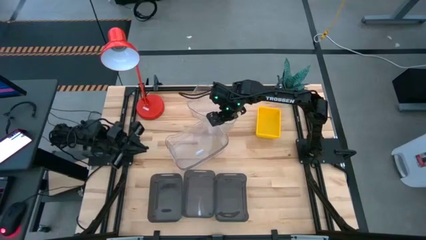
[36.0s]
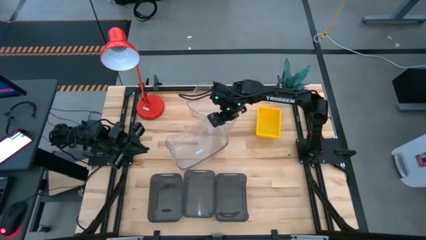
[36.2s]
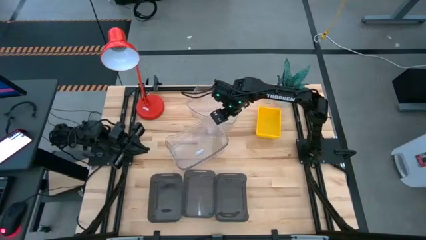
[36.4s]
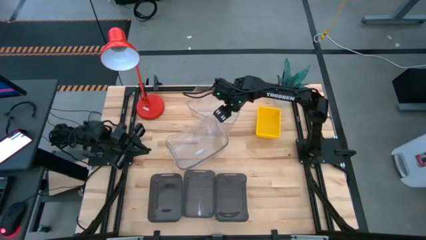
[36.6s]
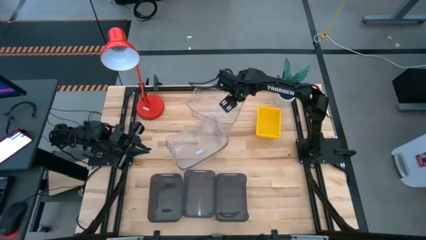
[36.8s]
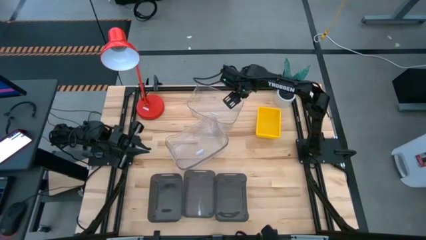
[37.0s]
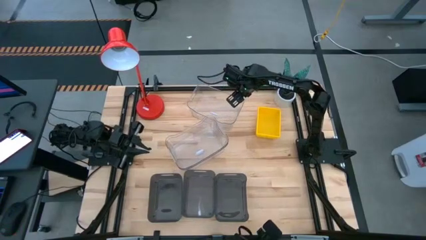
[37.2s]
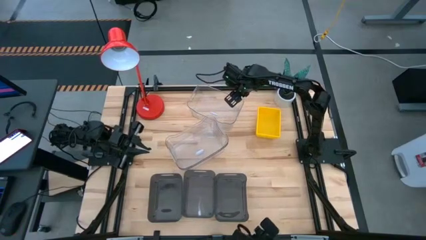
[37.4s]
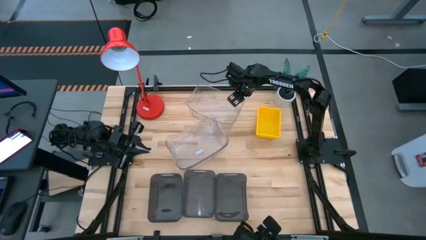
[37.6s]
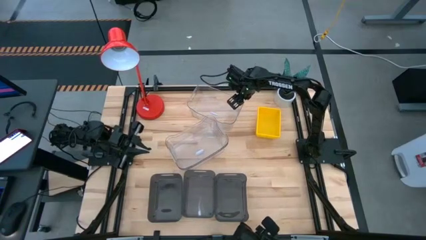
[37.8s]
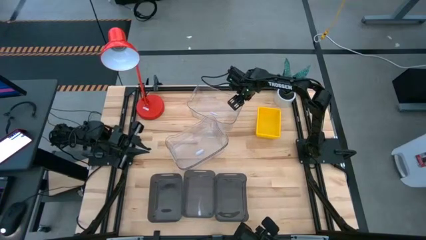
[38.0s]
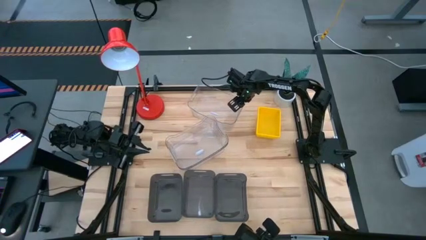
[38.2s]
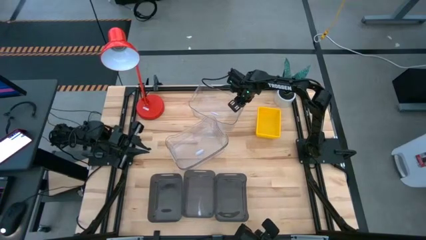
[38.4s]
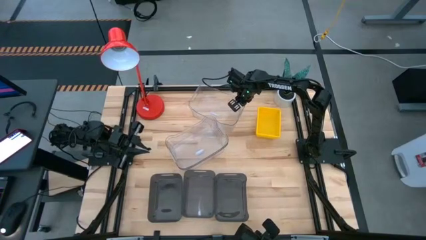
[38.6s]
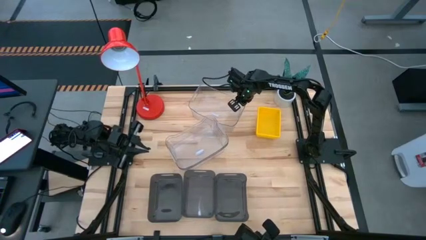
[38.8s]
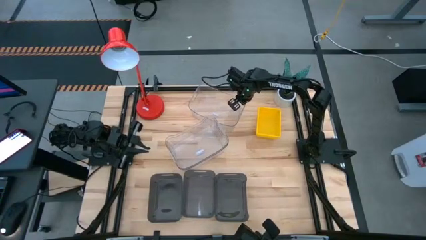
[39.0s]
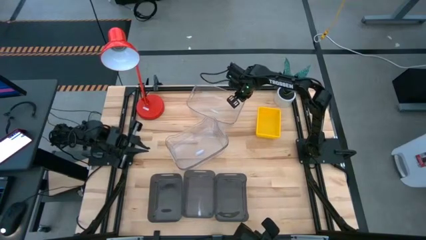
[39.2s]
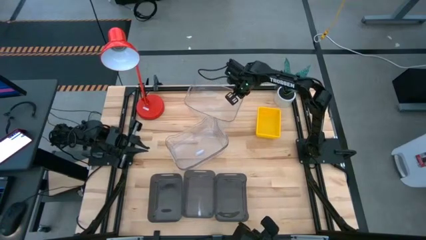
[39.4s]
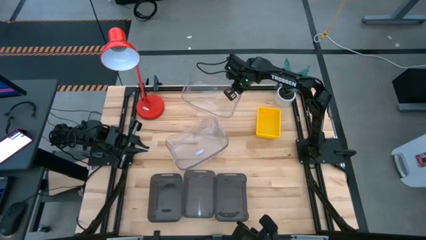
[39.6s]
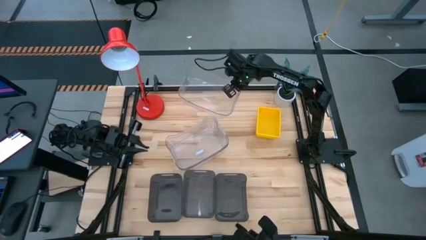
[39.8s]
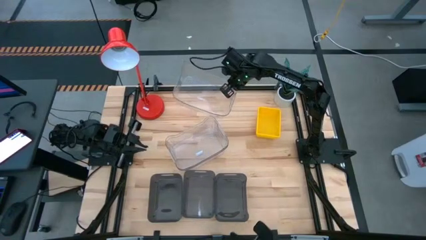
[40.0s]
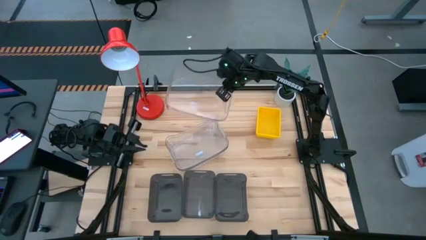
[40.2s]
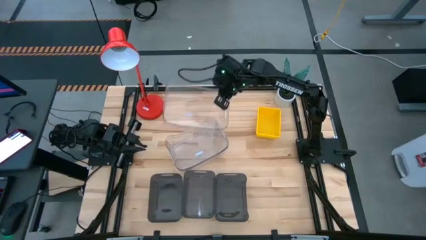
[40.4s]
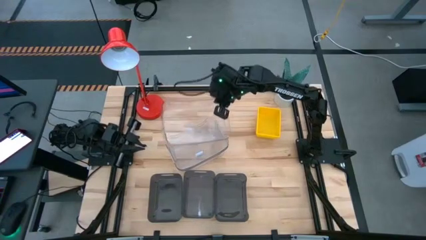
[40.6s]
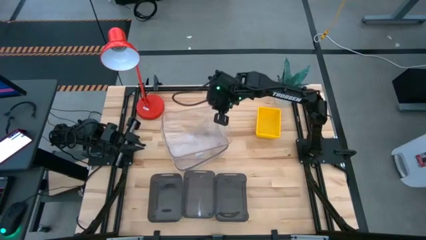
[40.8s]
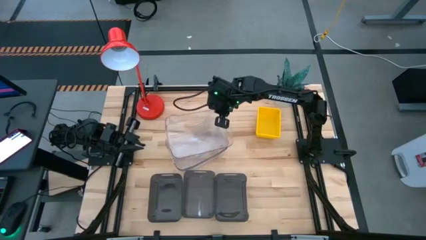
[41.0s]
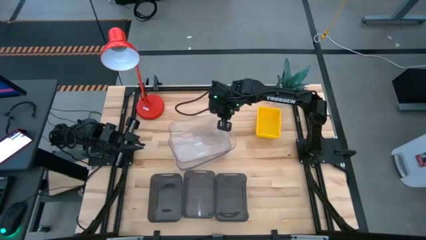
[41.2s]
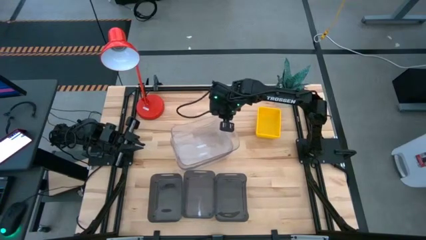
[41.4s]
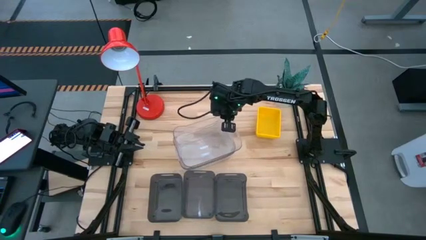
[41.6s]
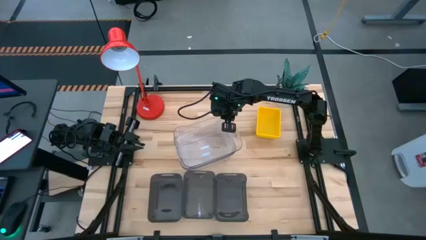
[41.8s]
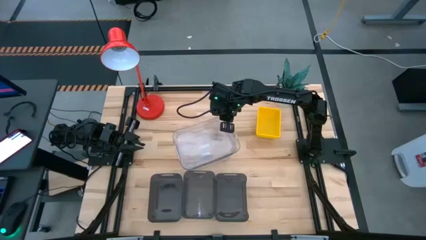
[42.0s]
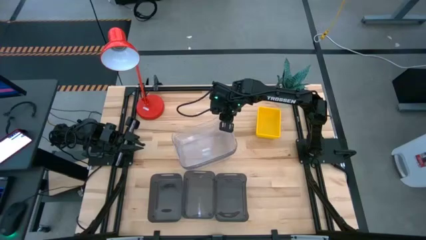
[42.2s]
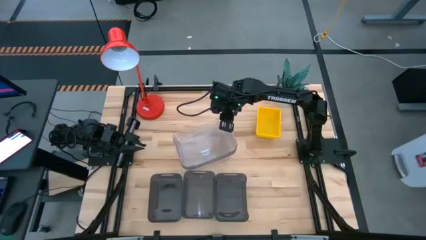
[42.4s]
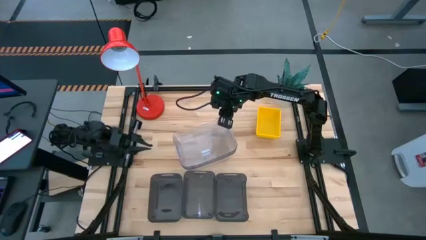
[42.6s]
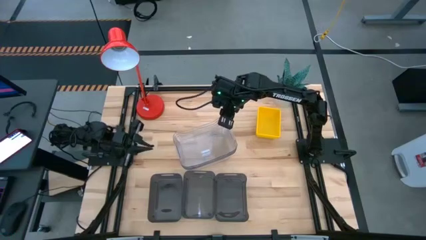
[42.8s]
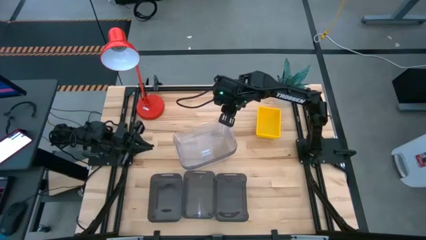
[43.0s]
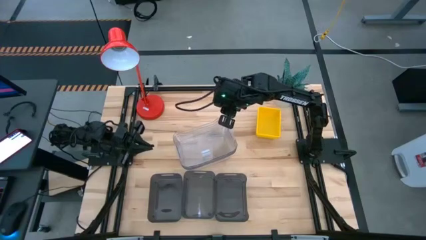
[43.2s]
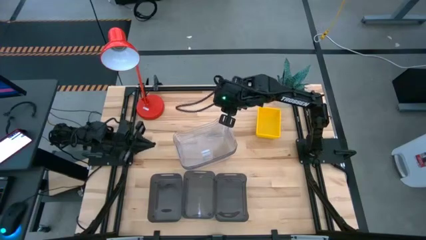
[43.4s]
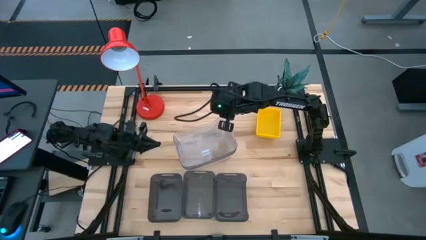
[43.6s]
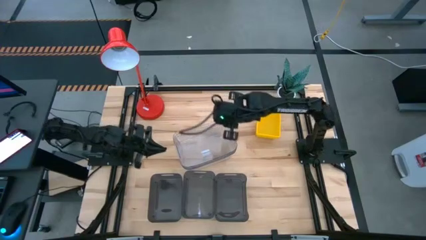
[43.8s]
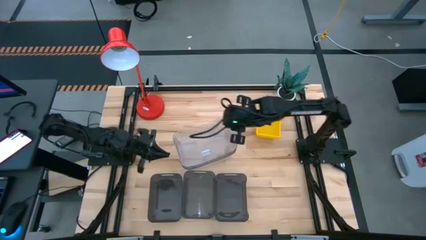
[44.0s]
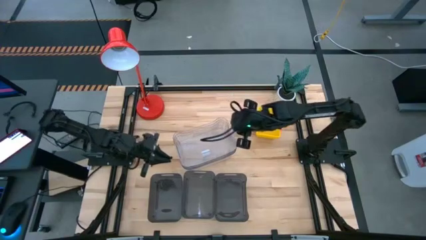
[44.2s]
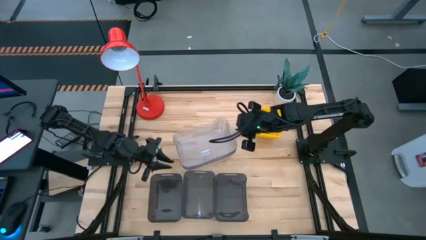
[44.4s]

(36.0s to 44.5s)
Stack the top transparent bin on the bottom stacked transparent bins

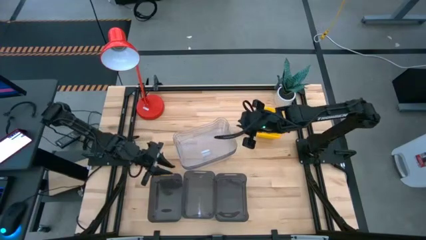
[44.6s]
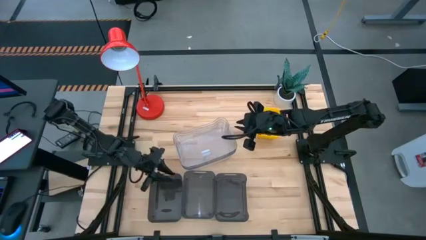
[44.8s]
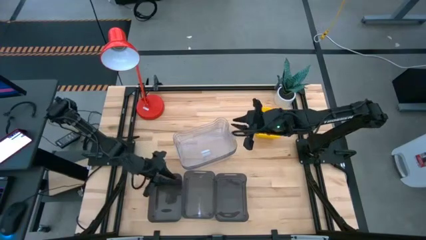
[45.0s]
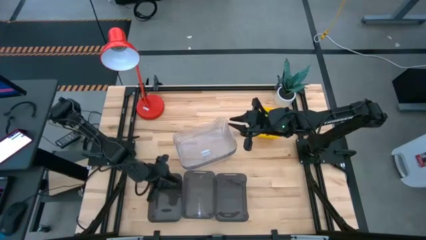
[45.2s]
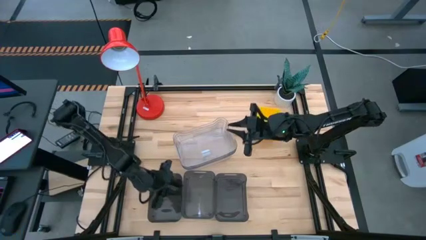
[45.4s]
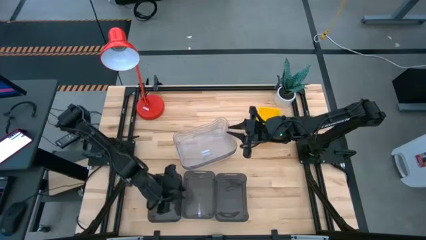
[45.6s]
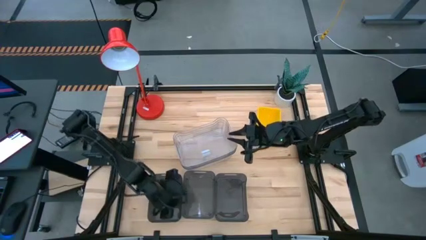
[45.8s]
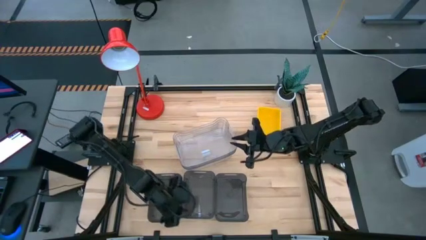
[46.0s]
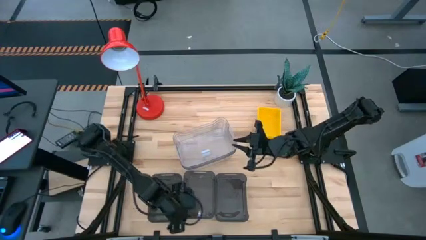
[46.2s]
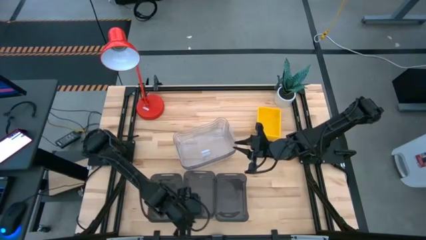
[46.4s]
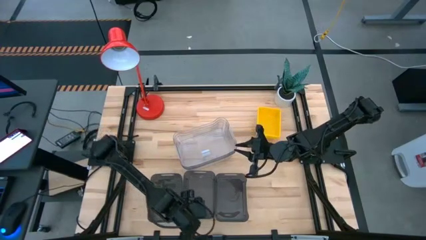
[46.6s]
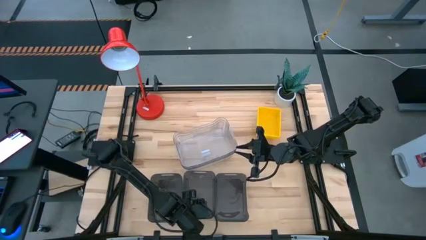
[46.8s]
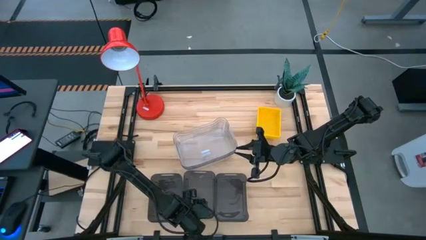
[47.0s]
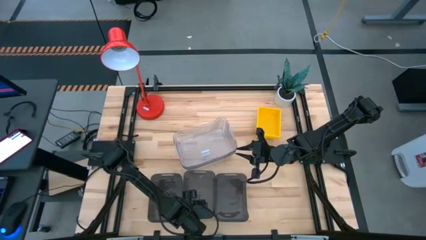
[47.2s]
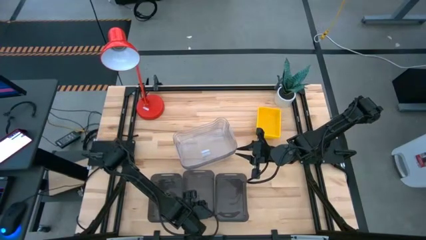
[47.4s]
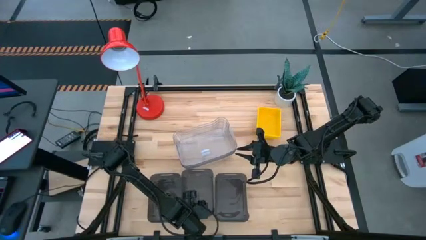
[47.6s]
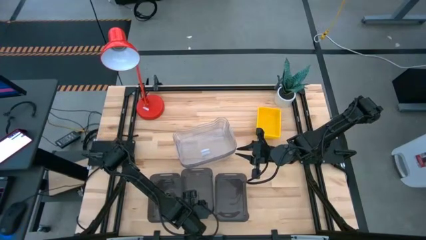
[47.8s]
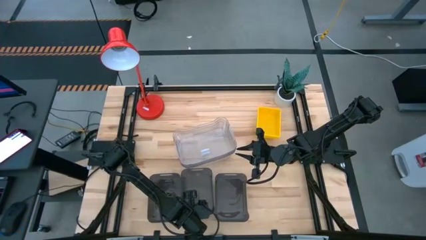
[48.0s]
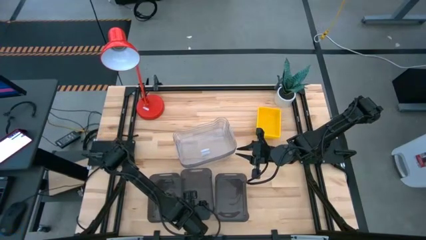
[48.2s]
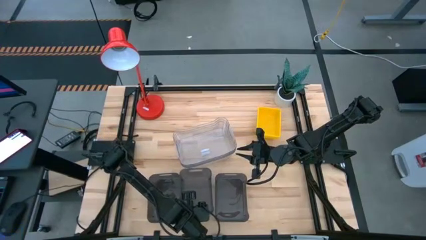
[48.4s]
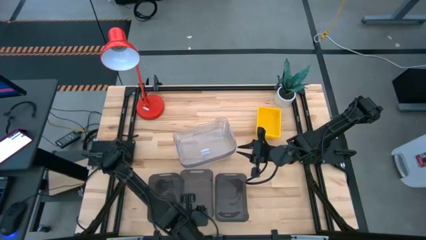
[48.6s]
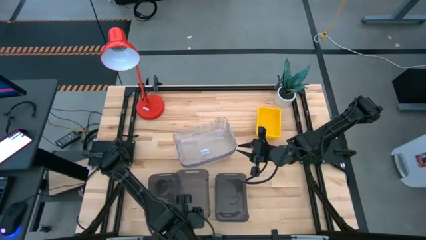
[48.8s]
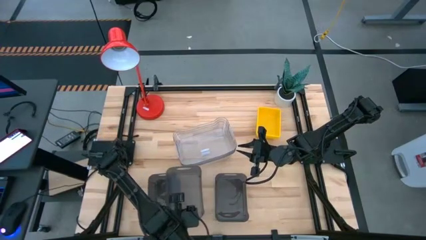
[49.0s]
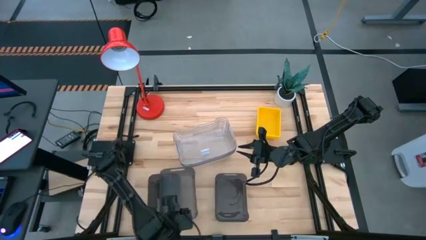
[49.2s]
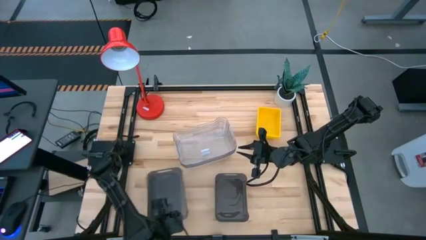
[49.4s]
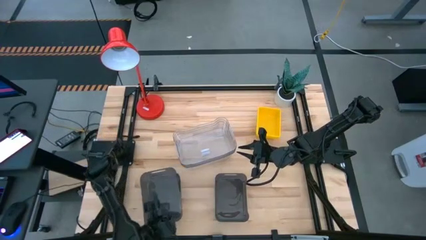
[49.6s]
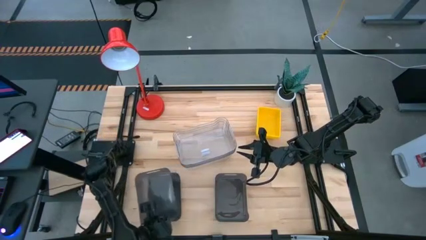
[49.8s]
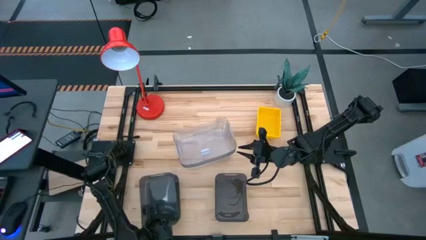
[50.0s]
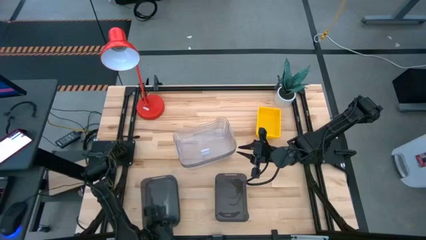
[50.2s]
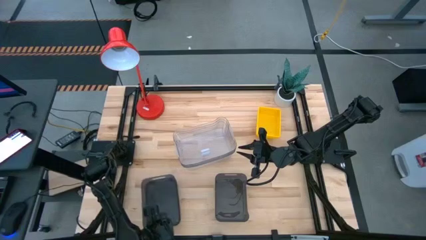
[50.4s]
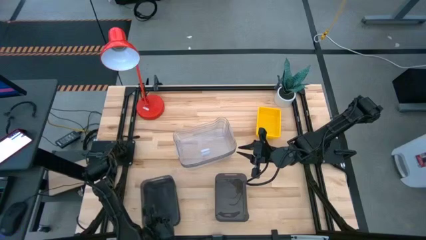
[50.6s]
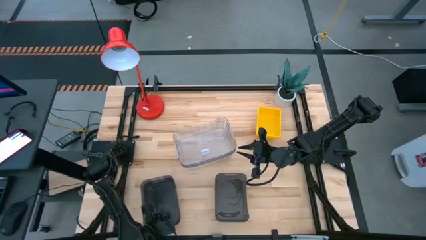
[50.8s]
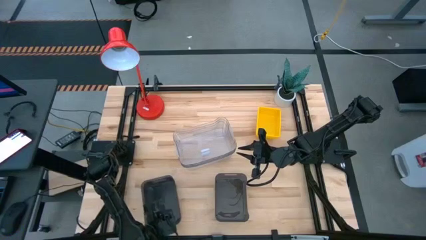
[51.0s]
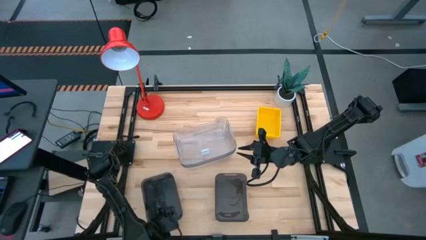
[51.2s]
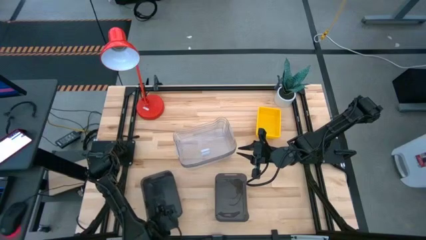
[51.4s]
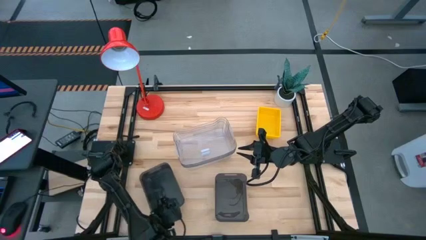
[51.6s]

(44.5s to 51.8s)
Stack the center black bin on the left black bin
